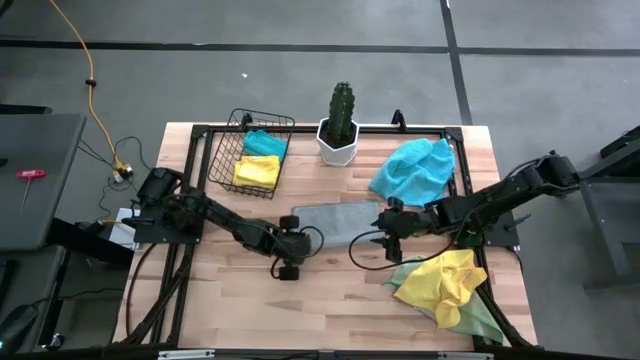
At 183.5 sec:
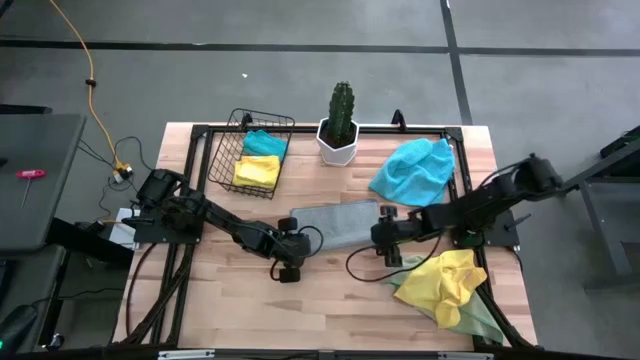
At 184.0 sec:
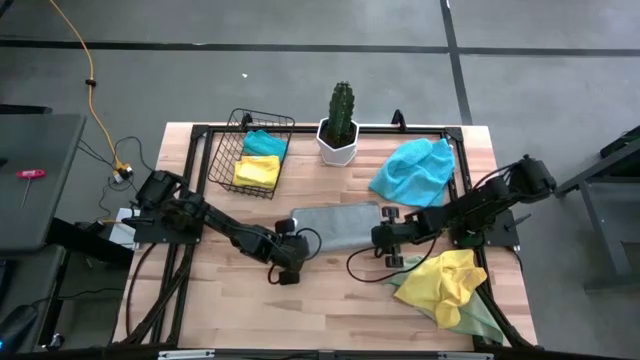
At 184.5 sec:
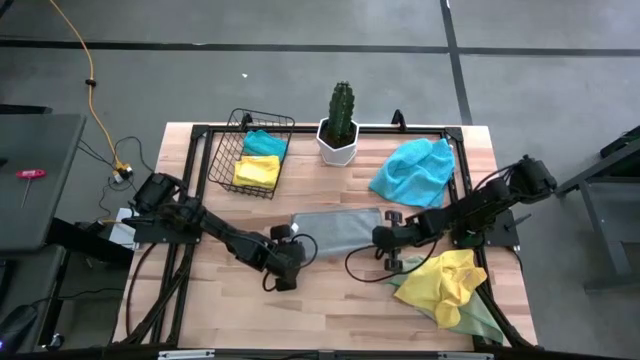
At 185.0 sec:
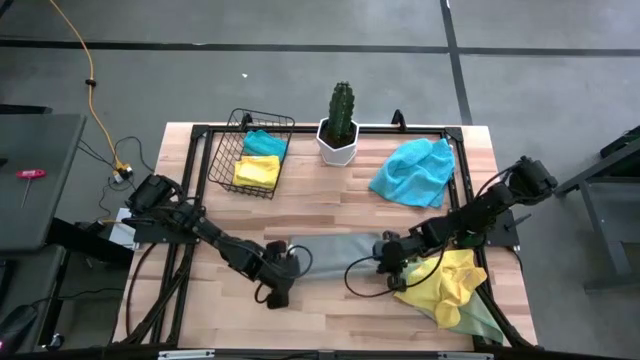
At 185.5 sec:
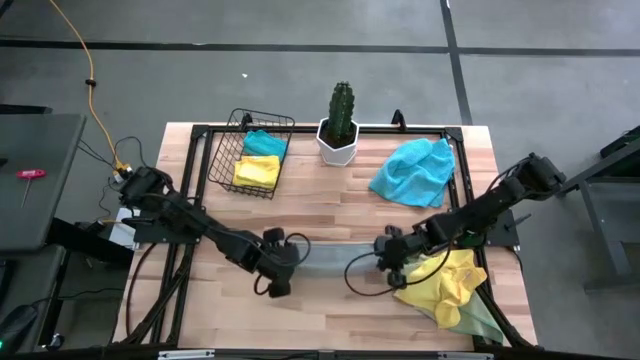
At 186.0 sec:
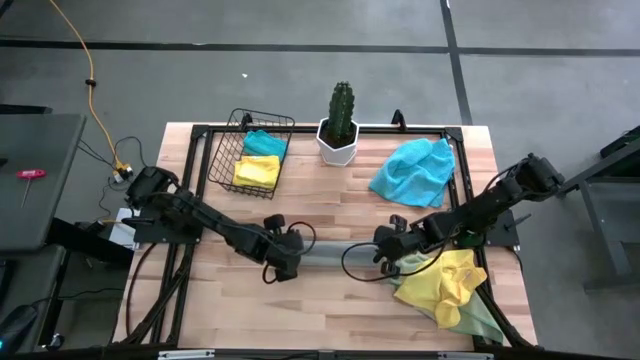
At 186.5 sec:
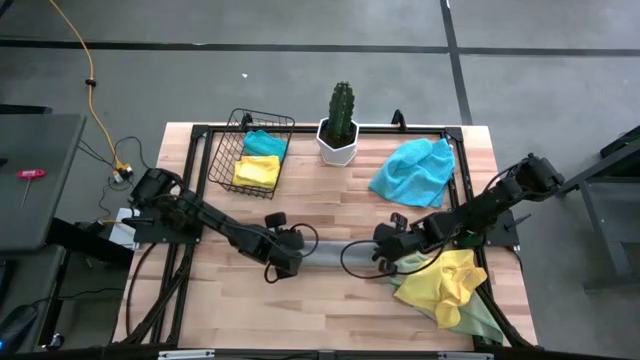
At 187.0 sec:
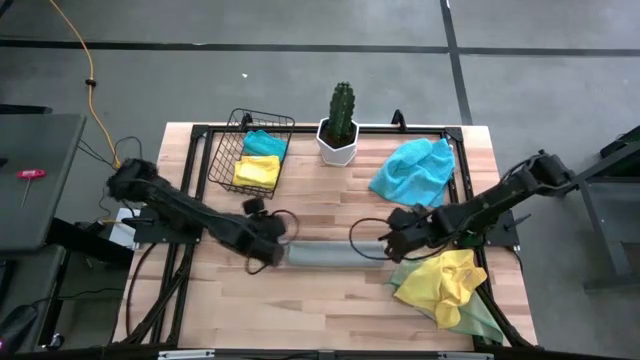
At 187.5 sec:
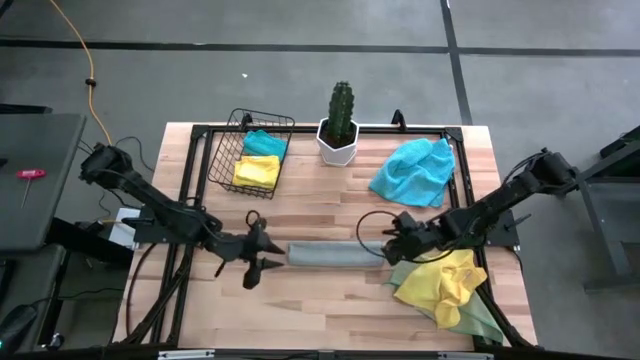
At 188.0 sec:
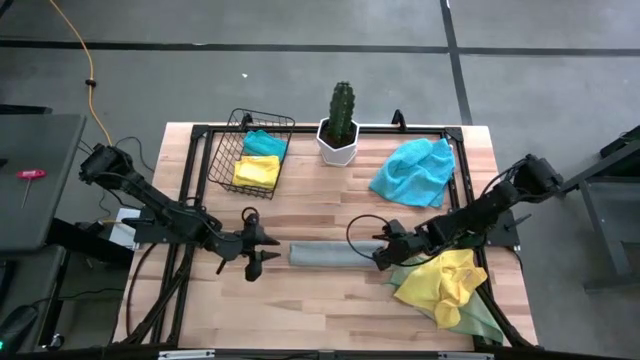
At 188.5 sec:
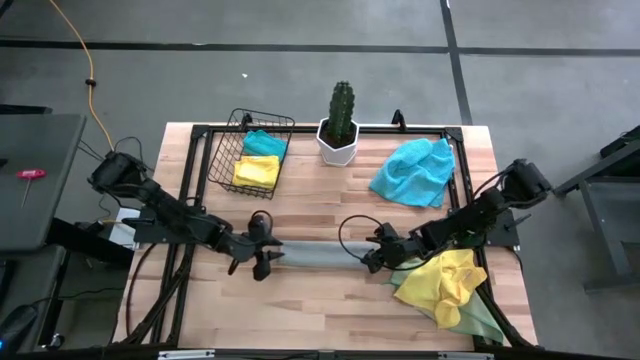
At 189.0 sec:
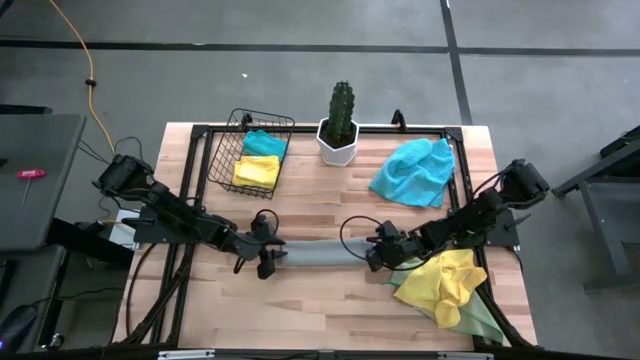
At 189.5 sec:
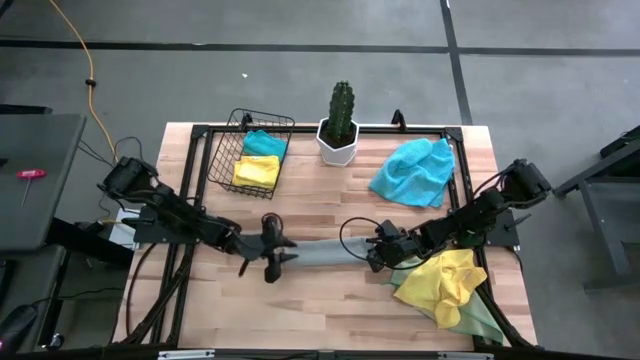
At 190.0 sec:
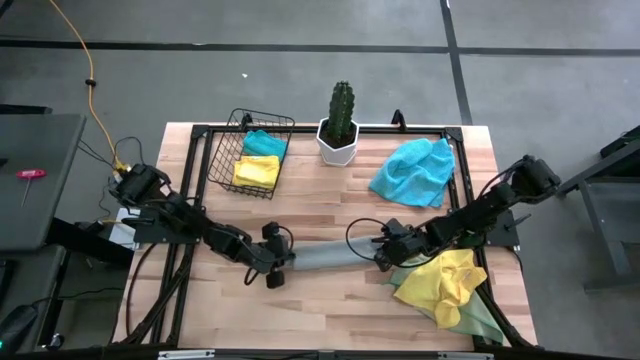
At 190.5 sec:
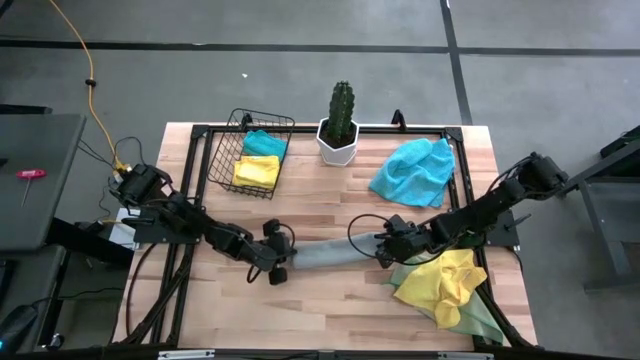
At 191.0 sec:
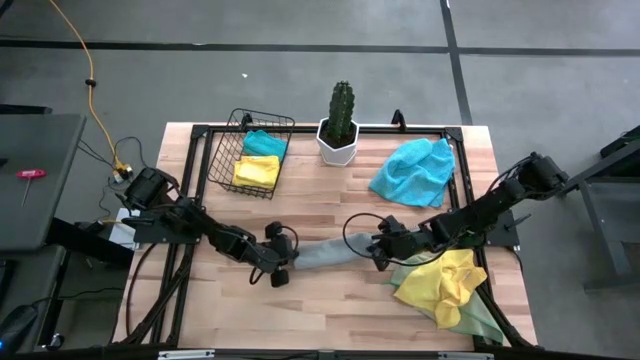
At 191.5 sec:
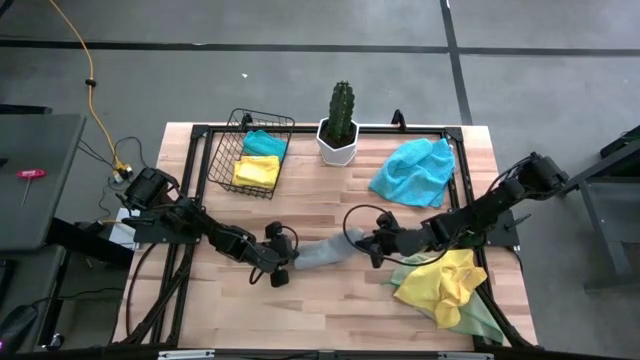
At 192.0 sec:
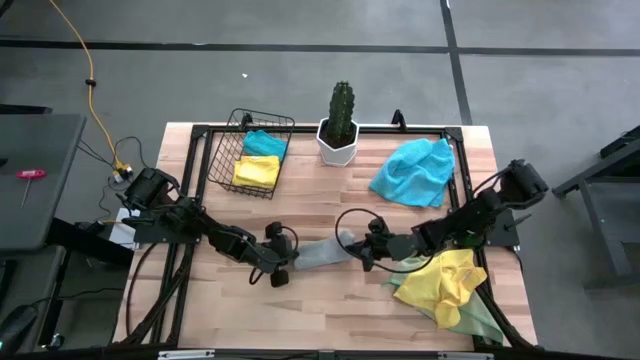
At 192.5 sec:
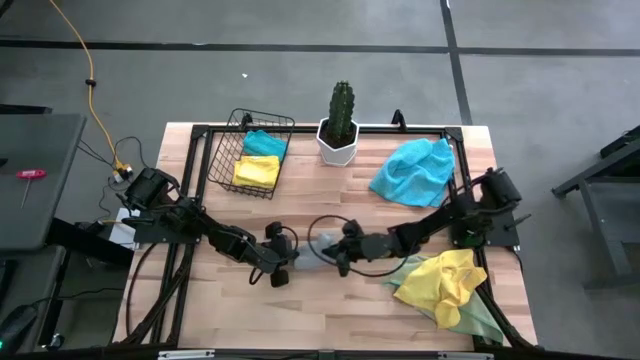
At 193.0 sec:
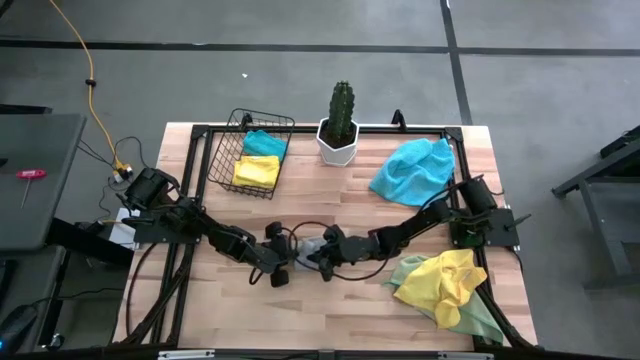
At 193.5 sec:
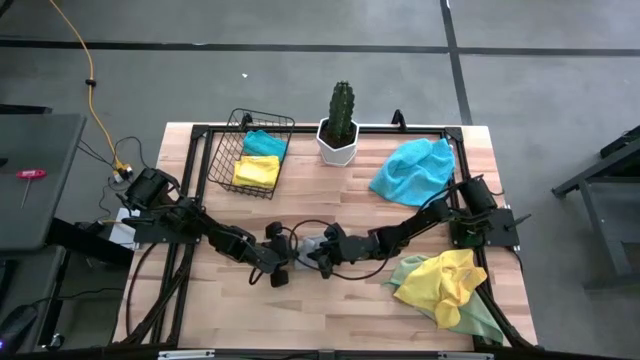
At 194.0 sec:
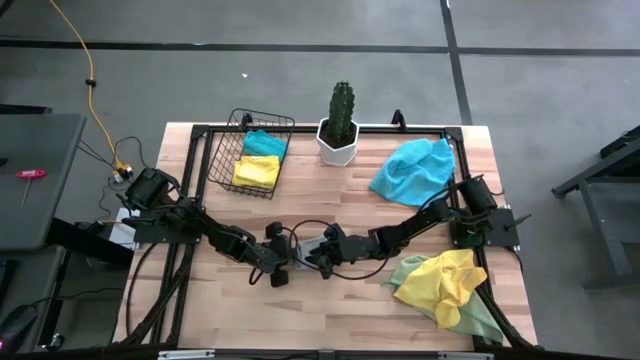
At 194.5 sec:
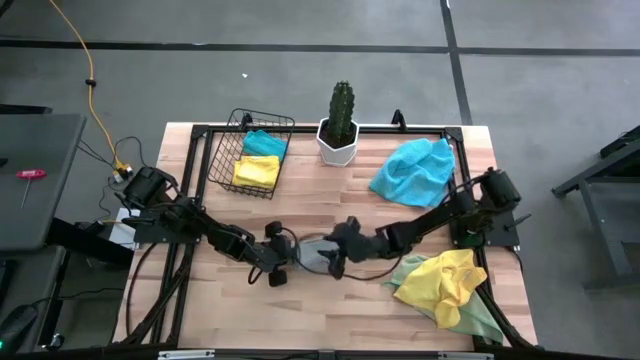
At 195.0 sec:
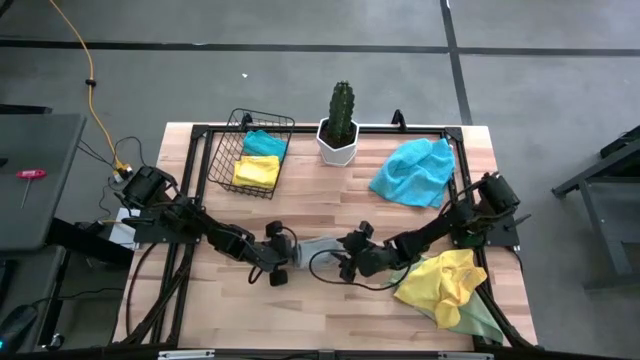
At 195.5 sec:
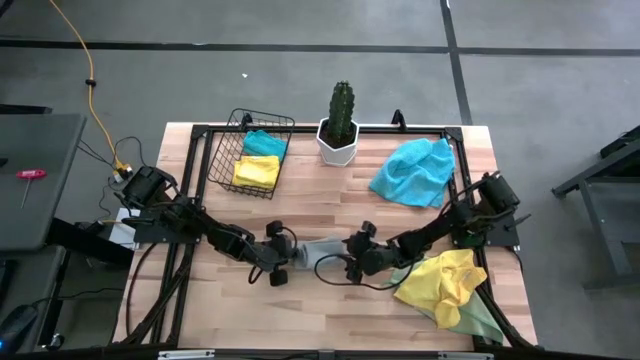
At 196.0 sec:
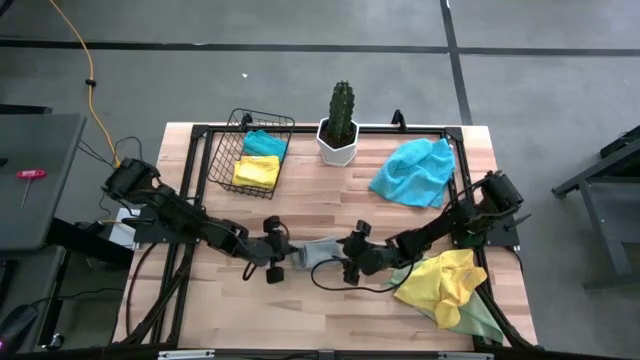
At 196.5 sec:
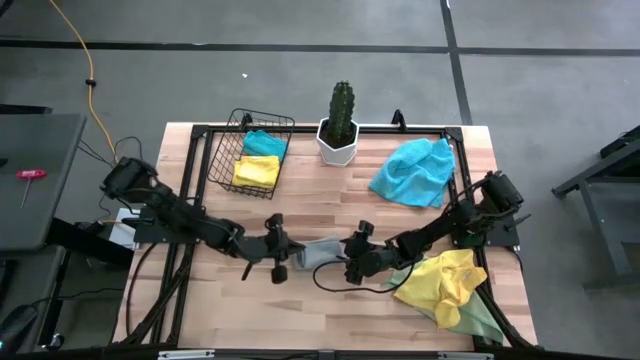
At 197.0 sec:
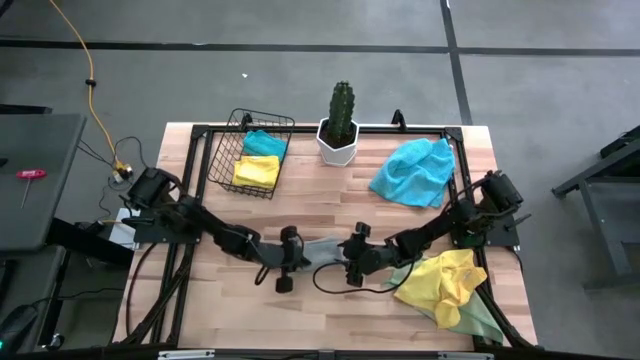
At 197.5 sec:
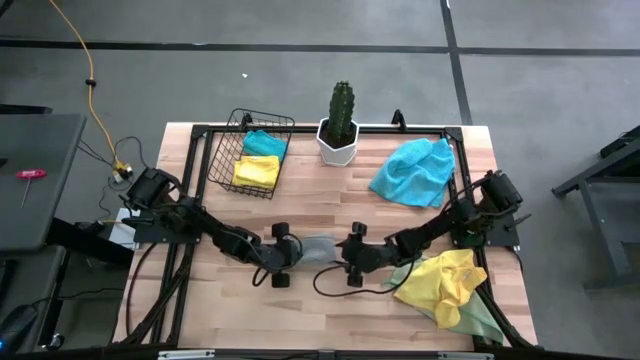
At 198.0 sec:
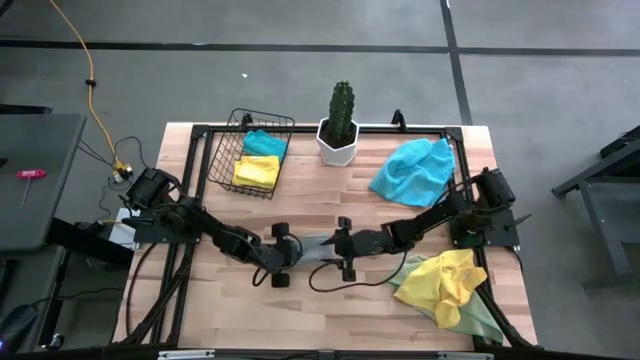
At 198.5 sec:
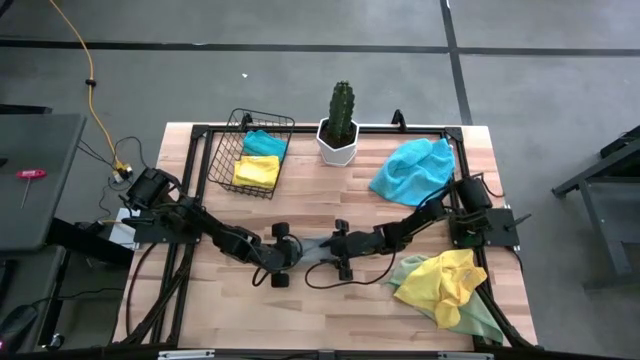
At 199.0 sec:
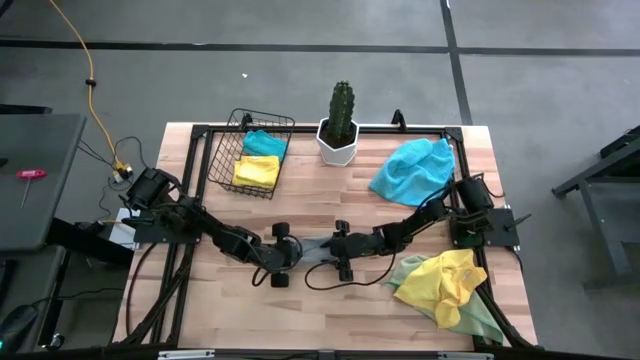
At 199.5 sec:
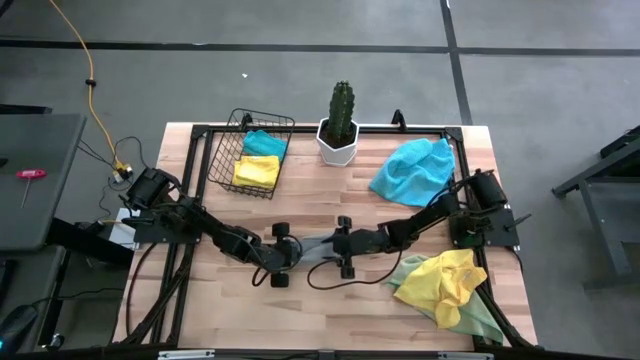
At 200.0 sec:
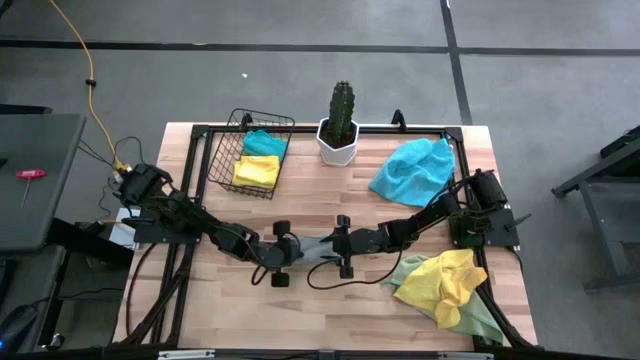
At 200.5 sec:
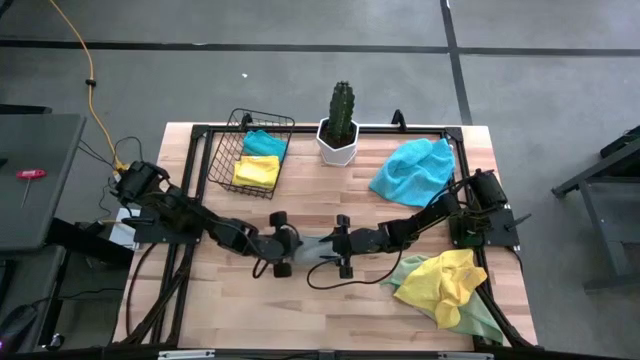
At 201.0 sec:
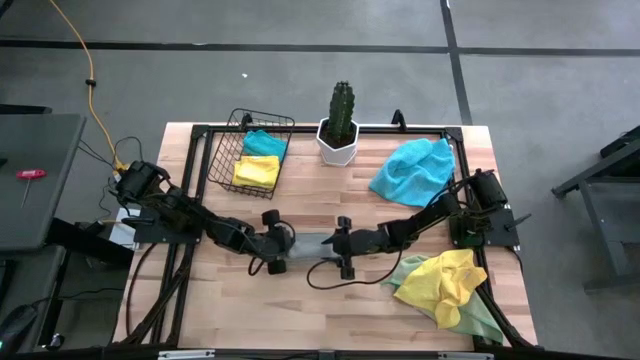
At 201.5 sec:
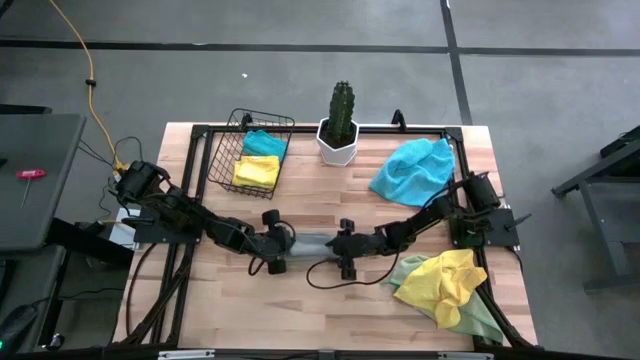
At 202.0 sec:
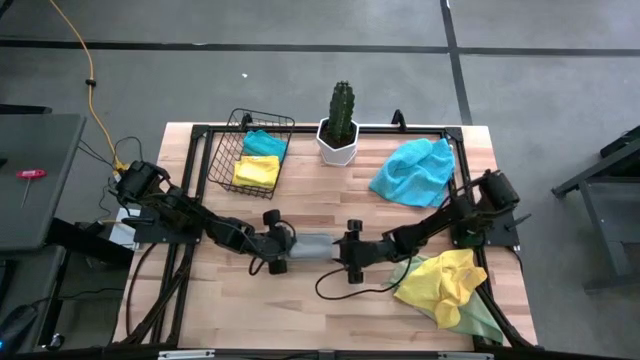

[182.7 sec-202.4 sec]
Task: Fold microfiber towels
Fold the gray microfiber towel on the table

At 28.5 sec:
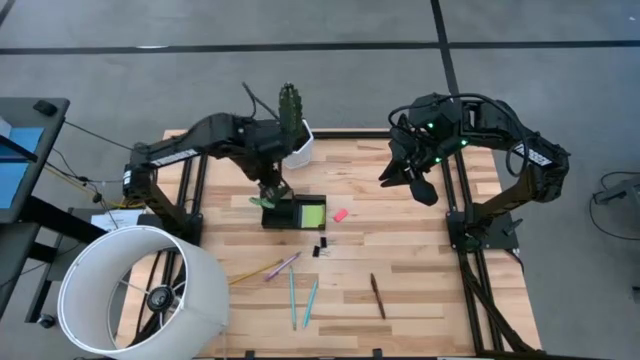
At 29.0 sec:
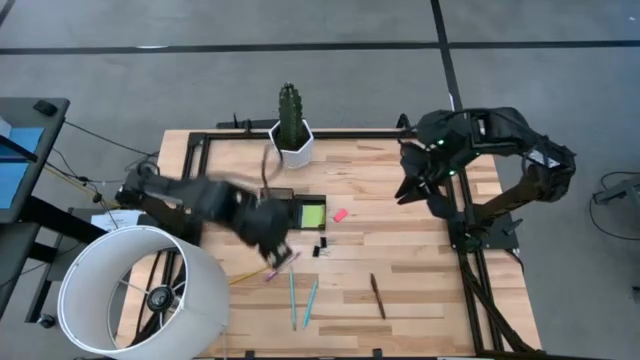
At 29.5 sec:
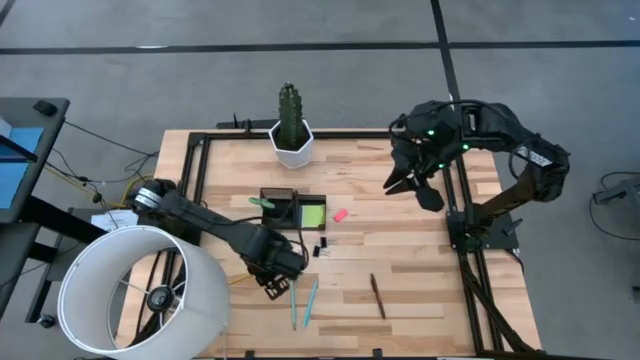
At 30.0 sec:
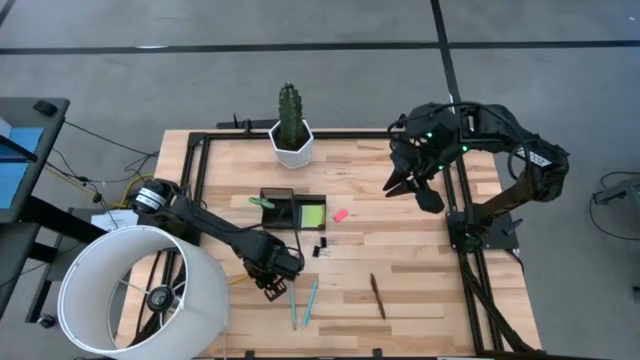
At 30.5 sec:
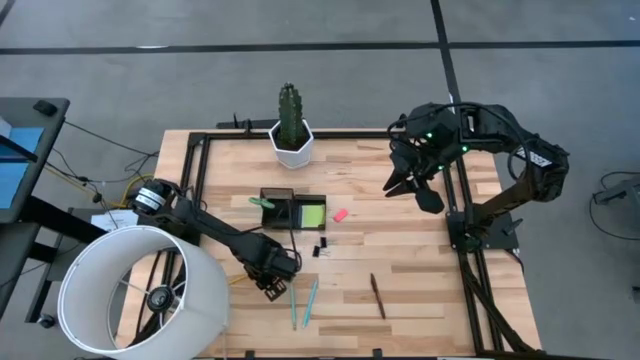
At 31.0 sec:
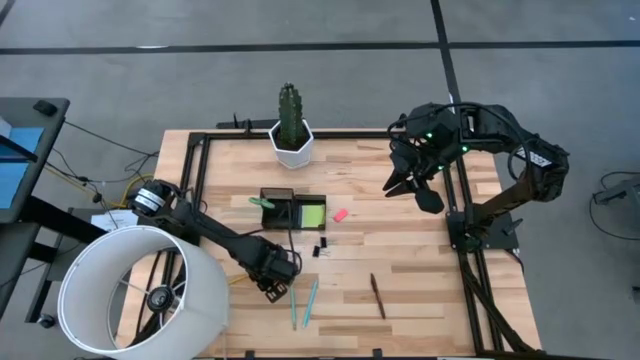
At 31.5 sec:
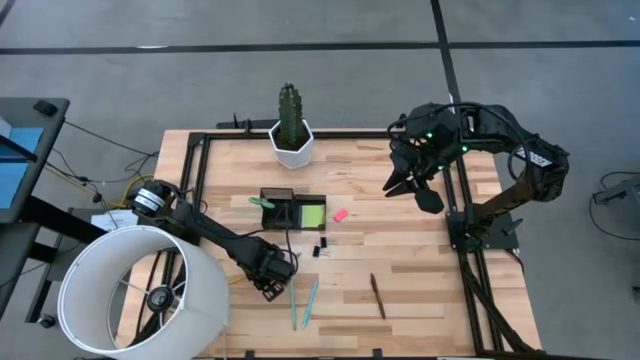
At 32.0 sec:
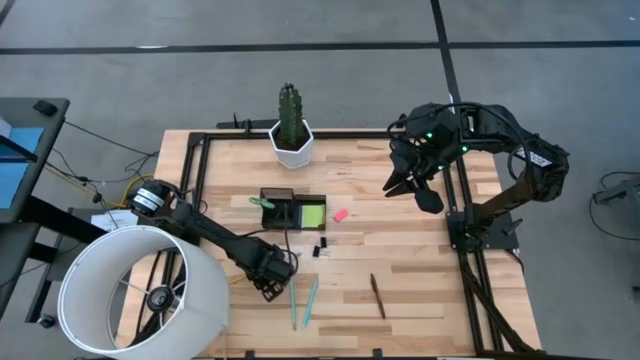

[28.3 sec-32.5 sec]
Task: Pick and place office supplies into organizer
Put the purple pen into the black mesh organizer
